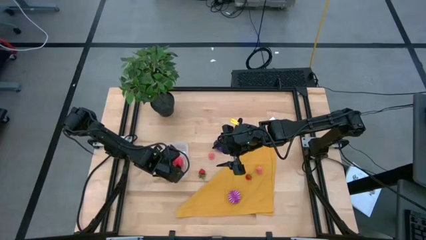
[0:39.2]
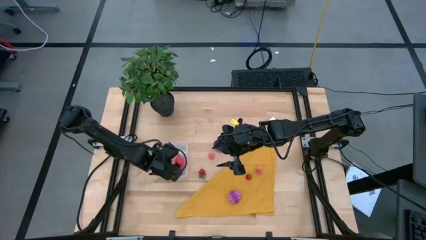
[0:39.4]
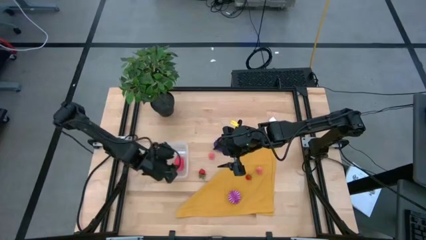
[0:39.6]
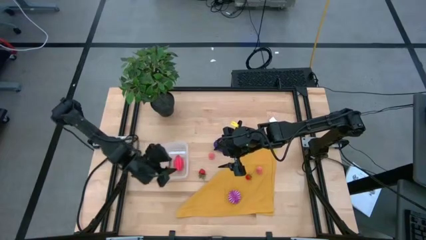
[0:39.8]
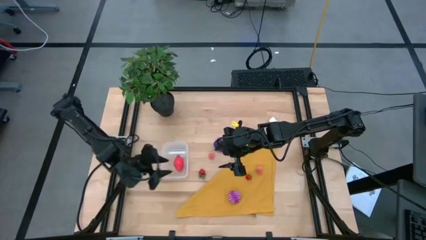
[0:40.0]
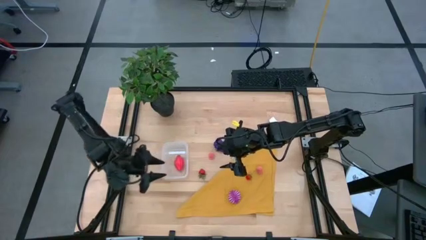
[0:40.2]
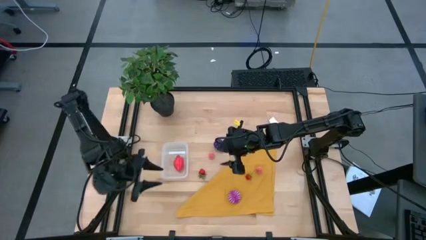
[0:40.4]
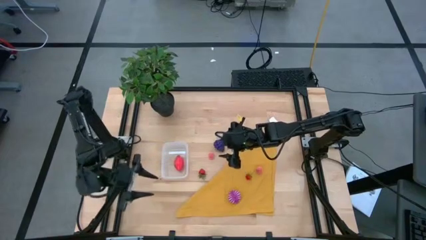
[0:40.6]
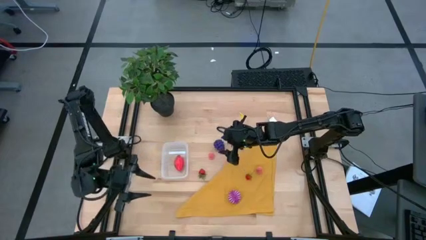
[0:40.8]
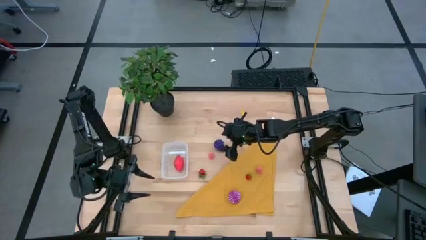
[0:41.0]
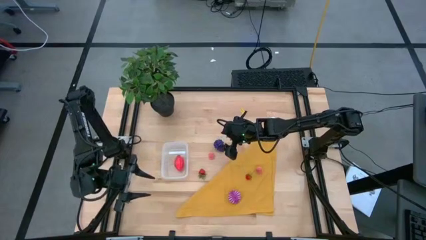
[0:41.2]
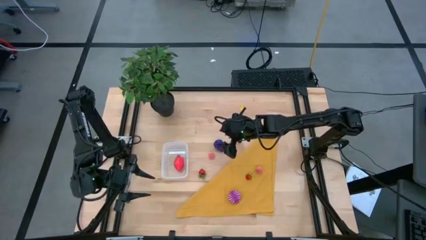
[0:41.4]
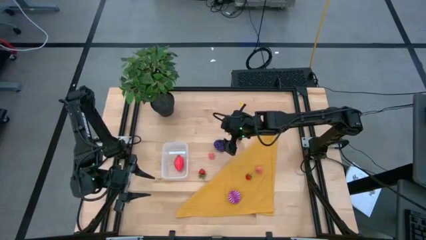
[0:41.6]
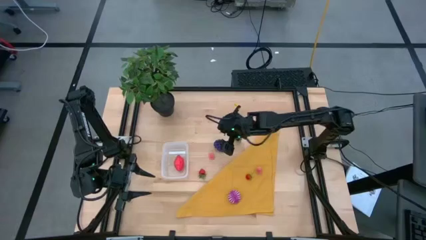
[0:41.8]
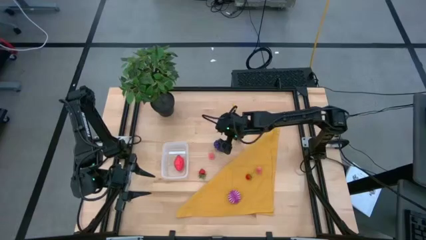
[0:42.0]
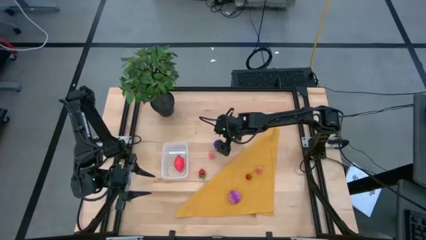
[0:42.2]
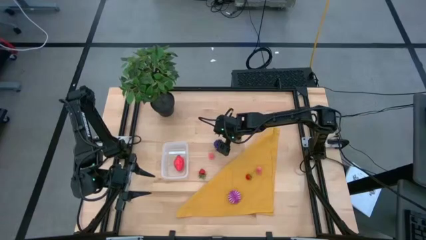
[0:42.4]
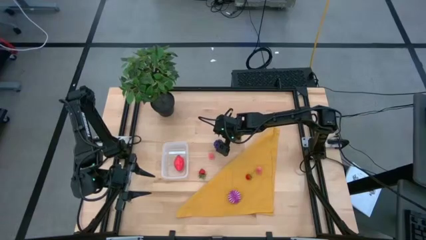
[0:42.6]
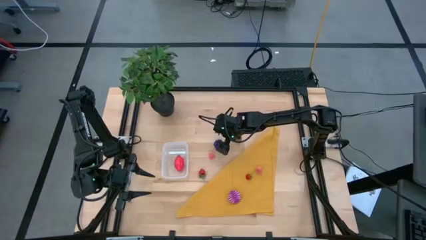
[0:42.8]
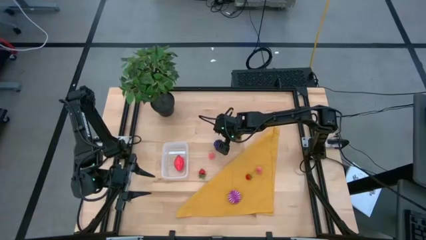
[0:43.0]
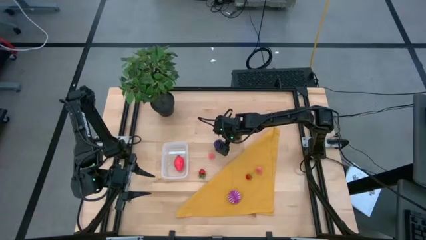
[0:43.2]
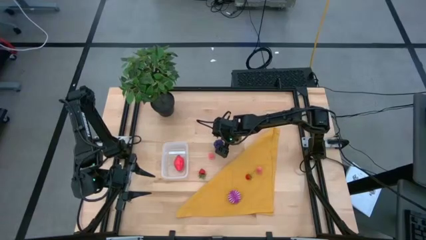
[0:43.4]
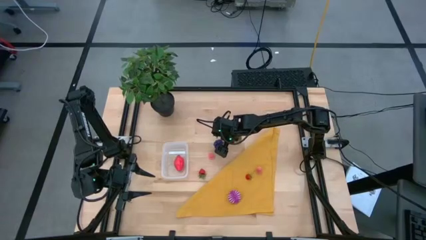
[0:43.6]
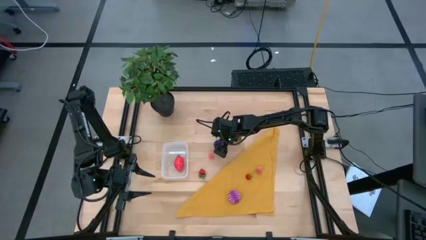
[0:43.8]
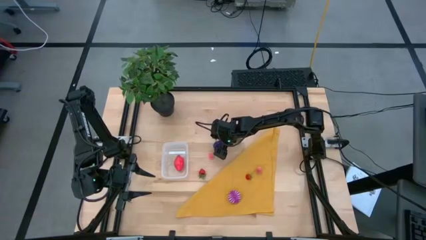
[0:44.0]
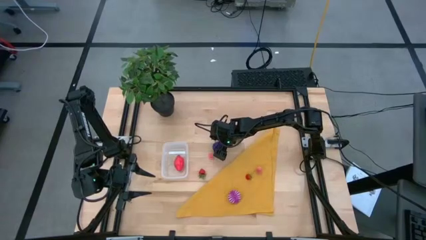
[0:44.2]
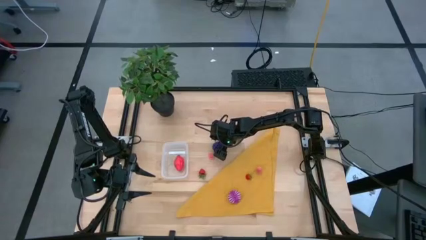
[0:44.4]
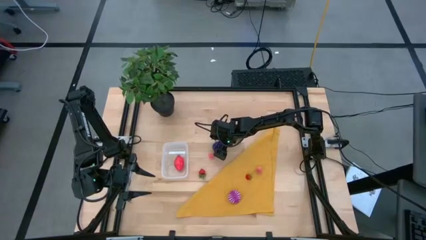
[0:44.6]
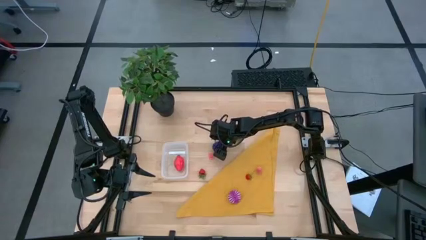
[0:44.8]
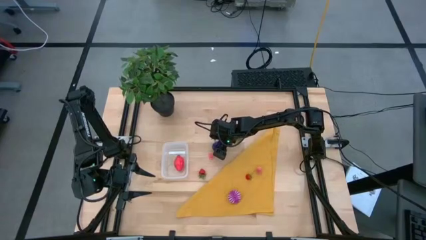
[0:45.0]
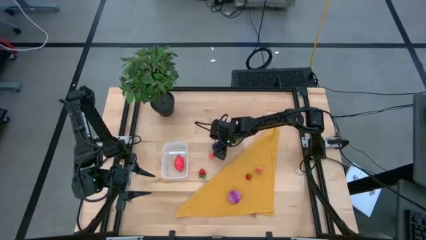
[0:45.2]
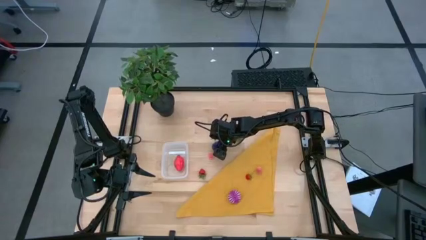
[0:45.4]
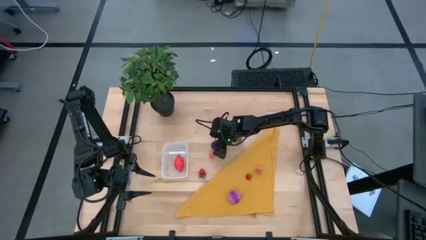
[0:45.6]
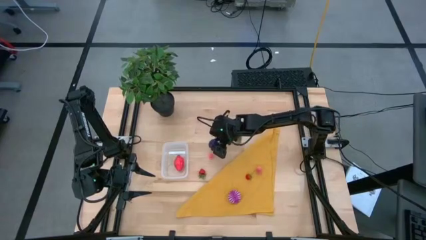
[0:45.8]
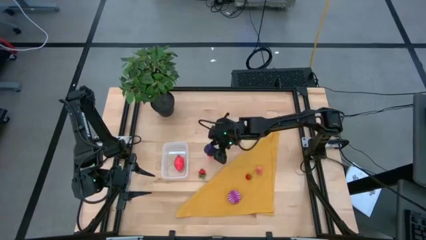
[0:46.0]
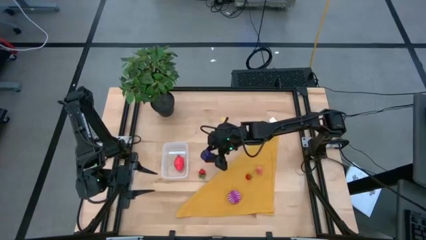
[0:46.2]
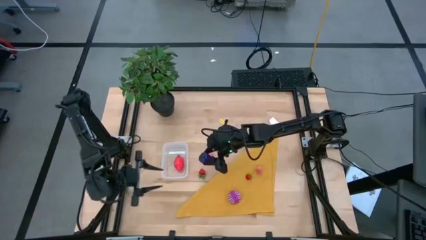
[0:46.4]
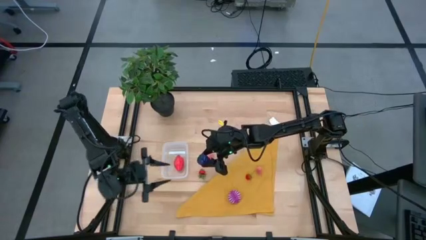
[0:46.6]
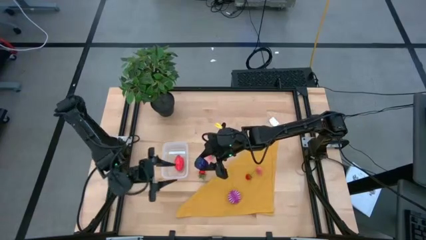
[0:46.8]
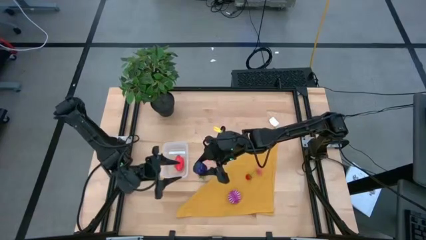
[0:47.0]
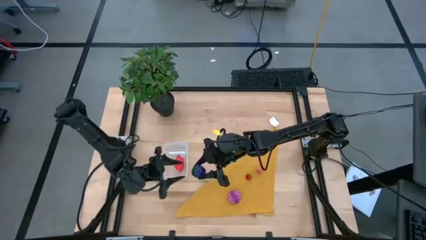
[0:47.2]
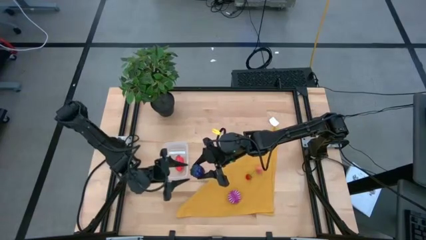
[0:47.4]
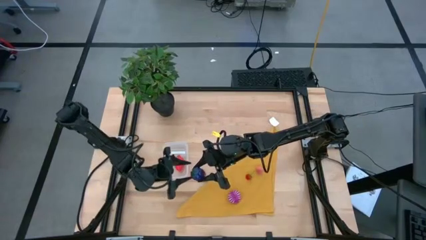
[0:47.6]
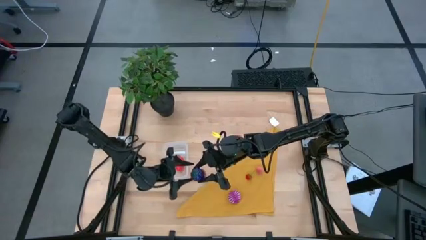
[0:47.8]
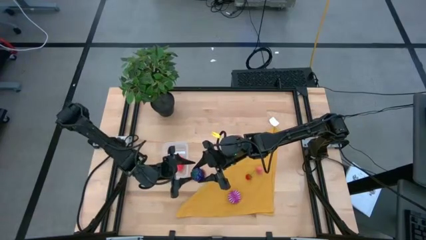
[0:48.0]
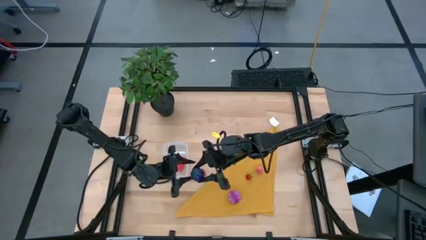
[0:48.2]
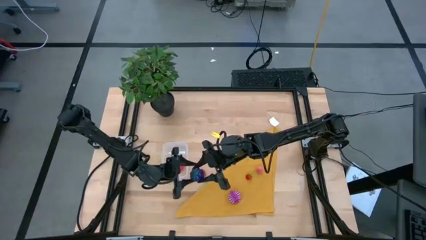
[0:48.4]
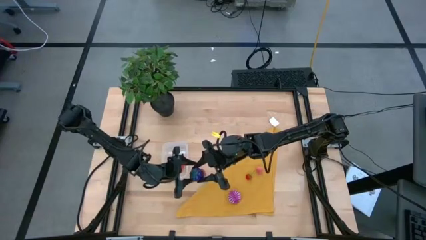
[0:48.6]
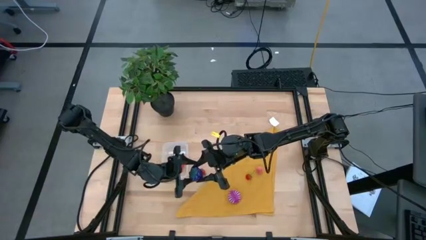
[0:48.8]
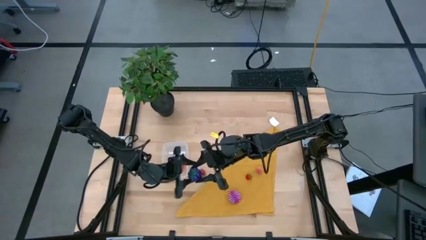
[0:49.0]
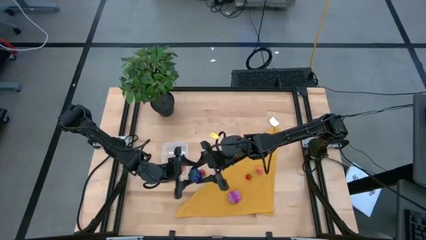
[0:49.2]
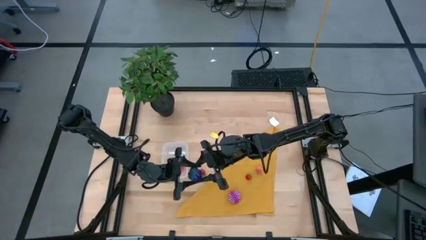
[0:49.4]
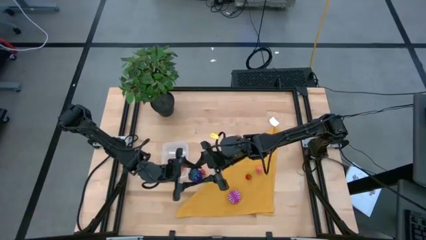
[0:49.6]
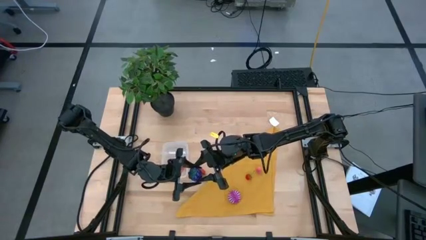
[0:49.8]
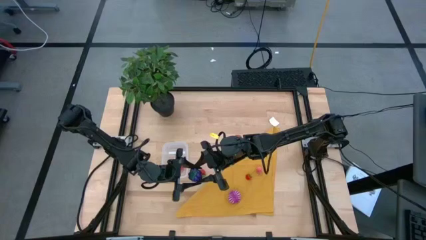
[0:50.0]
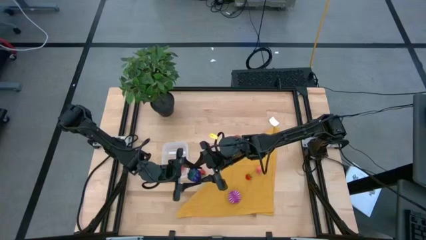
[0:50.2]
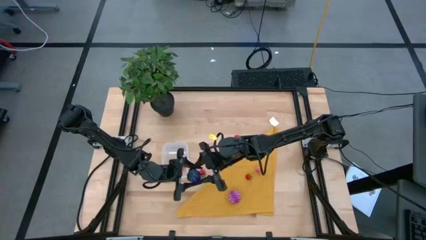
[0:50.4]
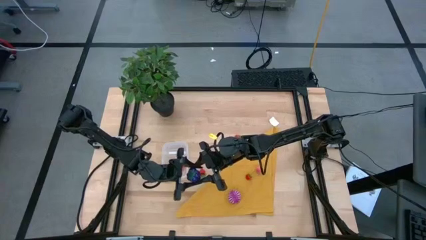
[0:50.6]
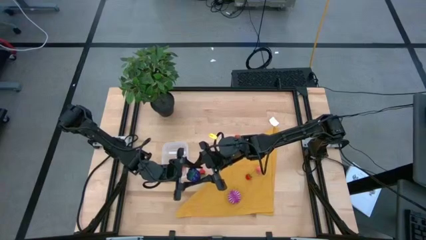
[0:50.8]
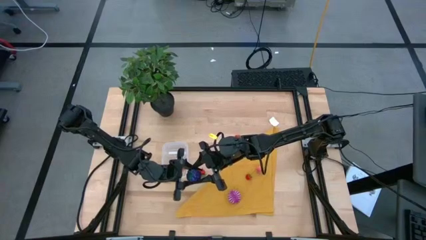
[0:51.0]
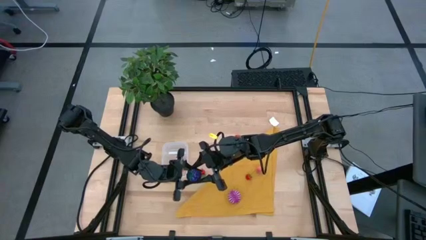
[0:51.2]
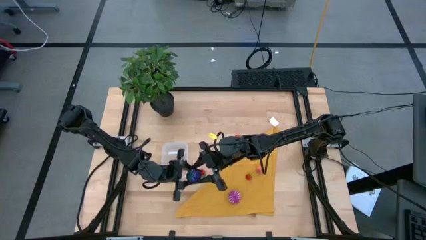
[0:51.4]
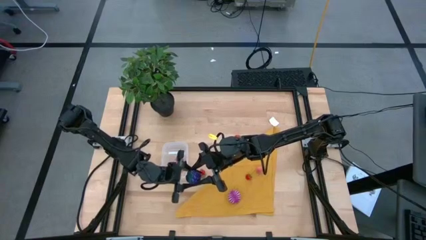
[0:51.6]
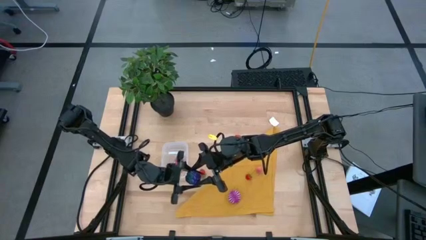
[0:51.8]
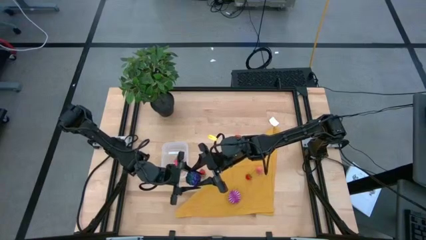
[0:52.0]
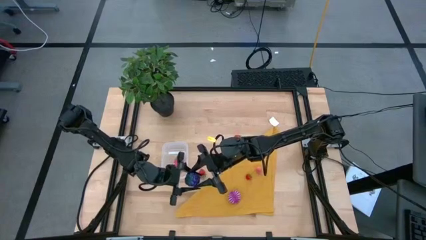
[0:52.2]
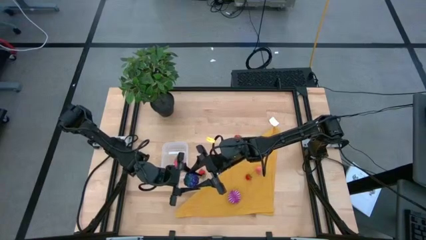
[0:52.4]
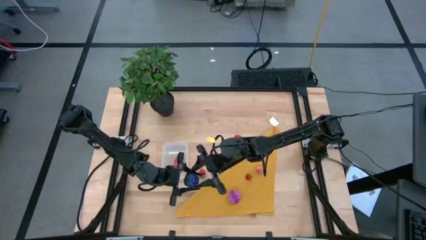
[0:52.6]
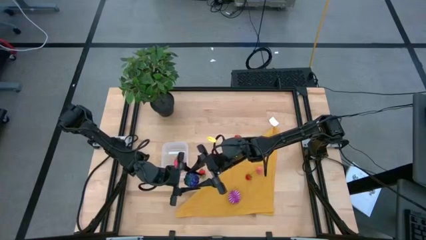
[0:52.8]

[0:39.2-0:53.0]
Task: Pick and placing Produce into tupperware
Put the purple grapes into the transparent bin
